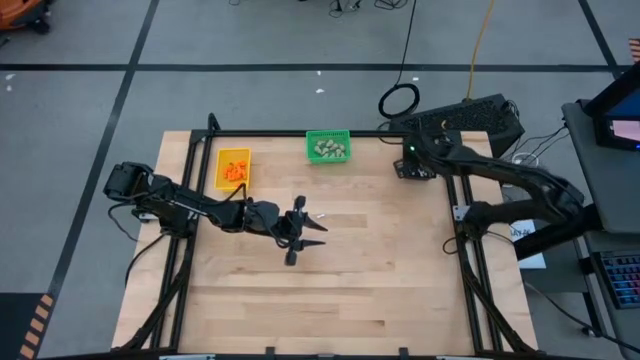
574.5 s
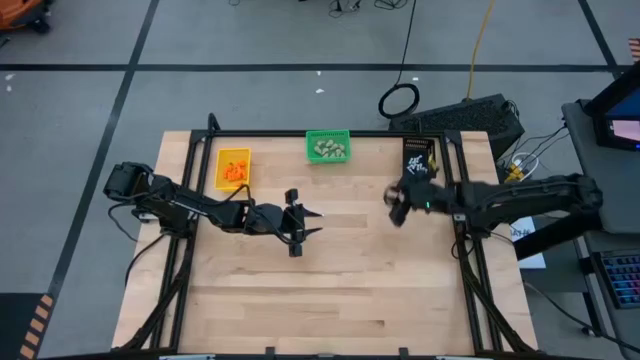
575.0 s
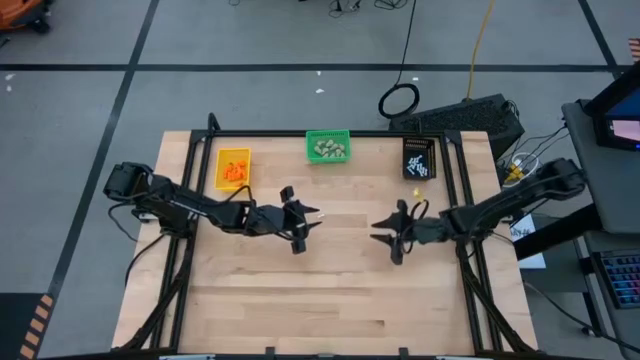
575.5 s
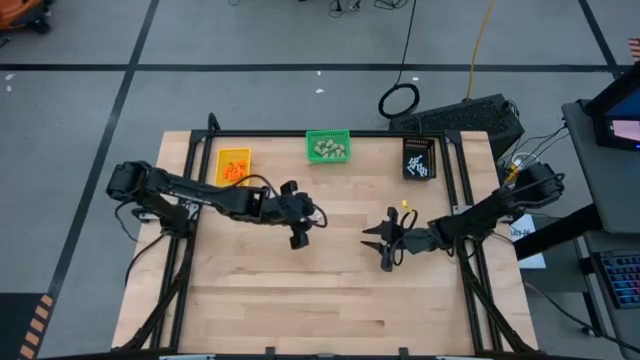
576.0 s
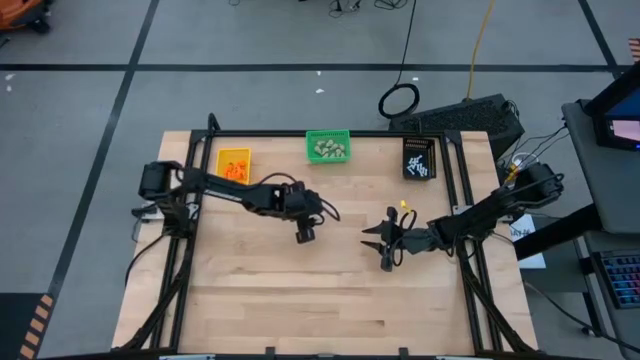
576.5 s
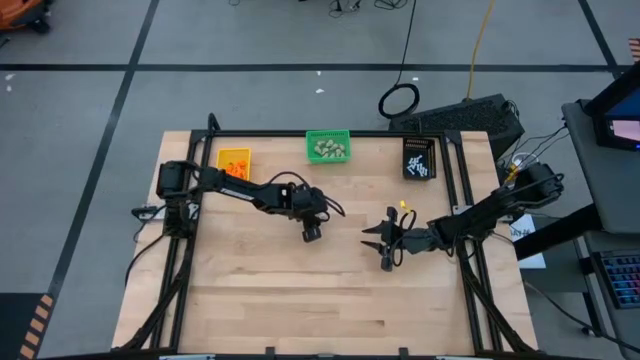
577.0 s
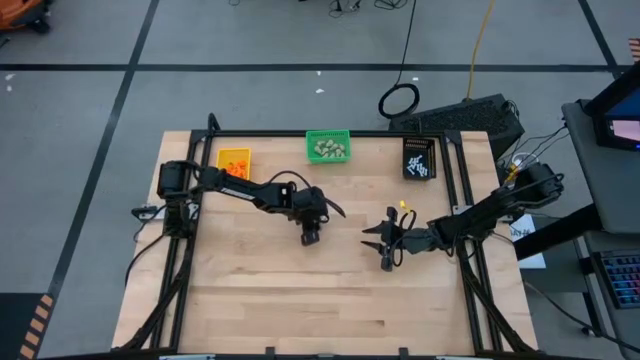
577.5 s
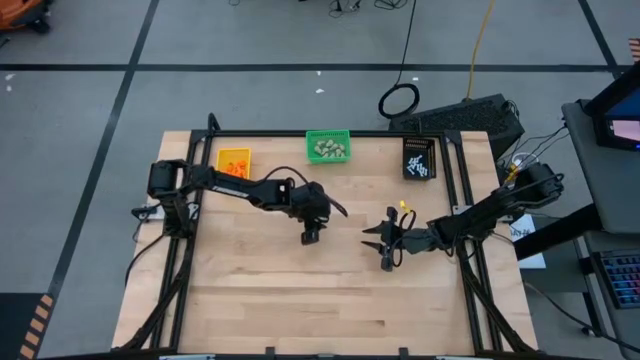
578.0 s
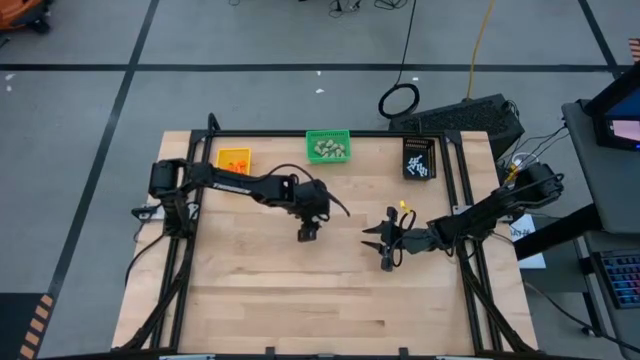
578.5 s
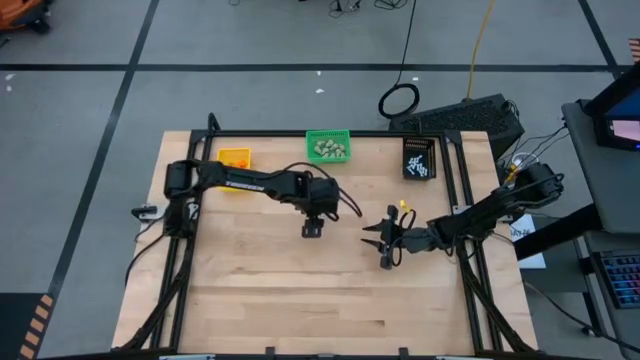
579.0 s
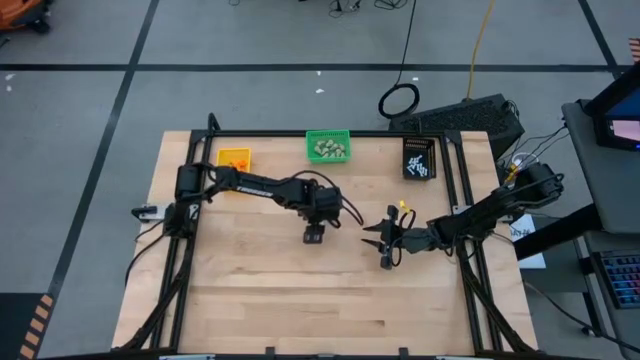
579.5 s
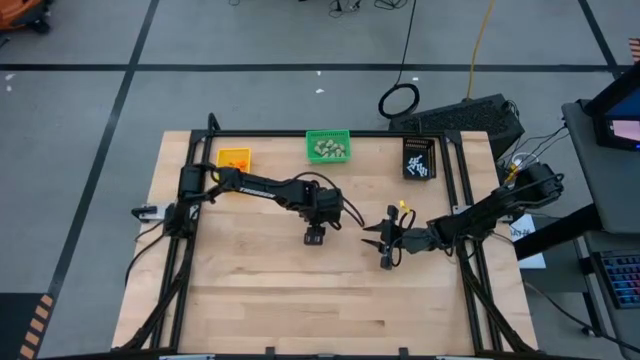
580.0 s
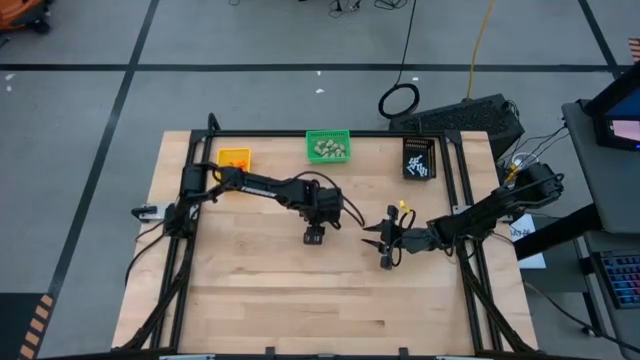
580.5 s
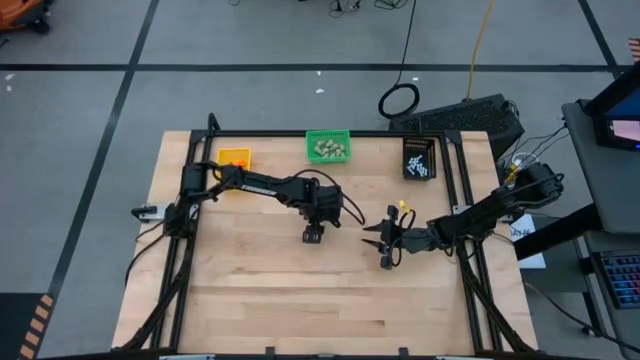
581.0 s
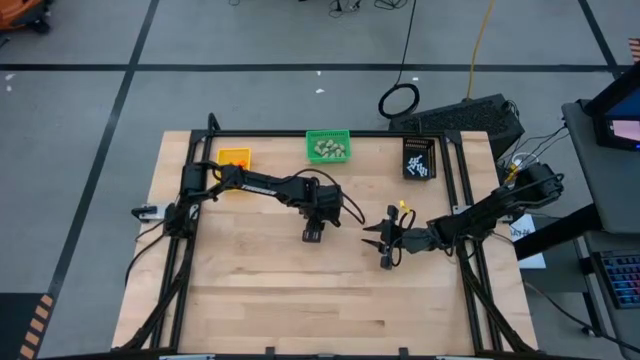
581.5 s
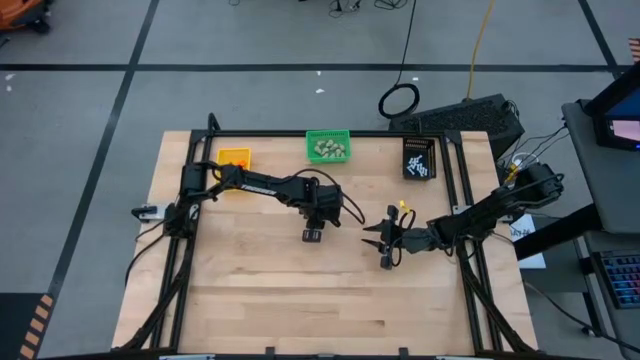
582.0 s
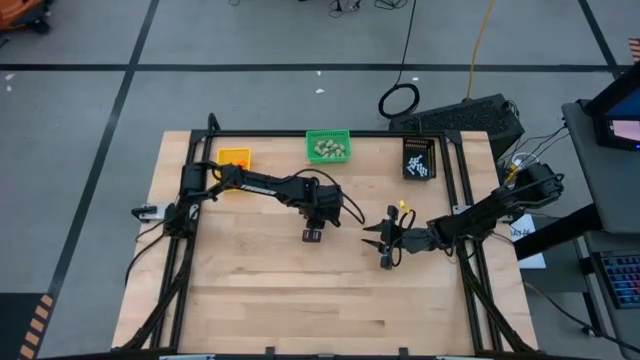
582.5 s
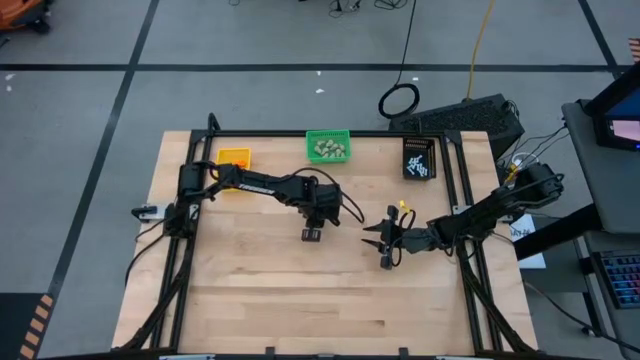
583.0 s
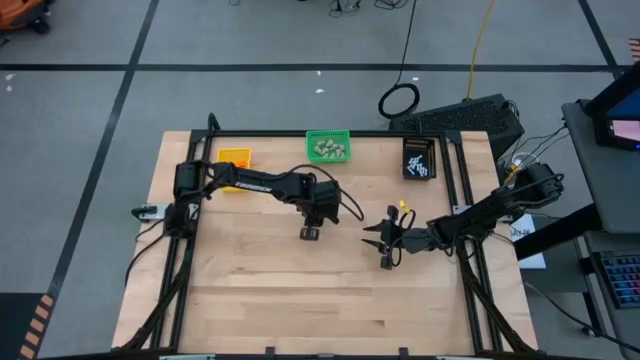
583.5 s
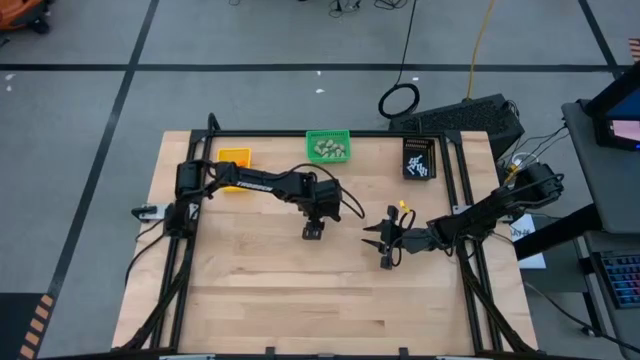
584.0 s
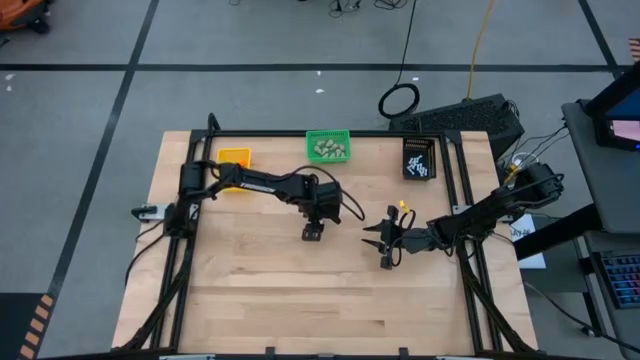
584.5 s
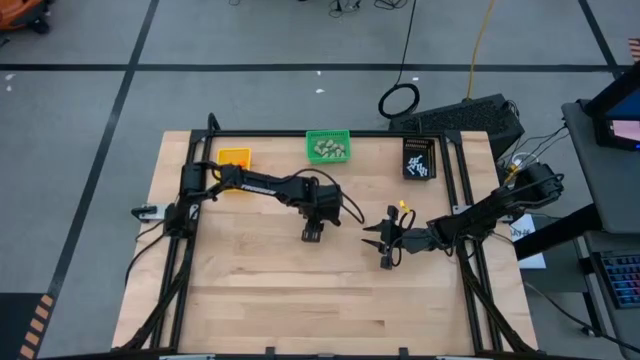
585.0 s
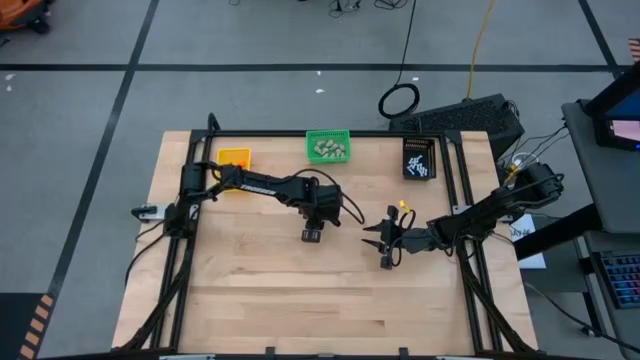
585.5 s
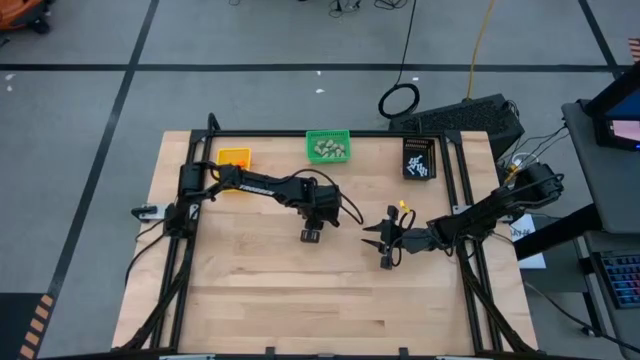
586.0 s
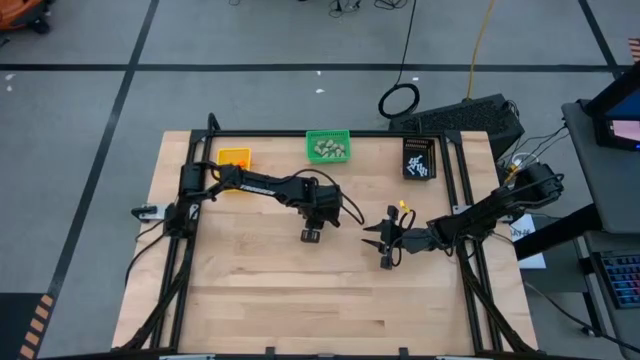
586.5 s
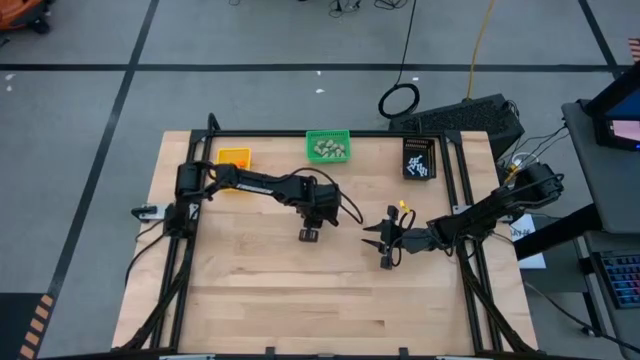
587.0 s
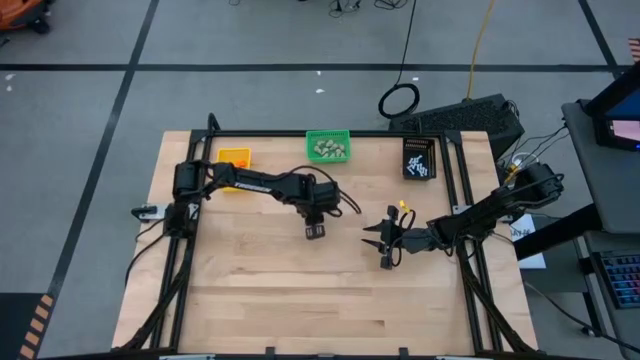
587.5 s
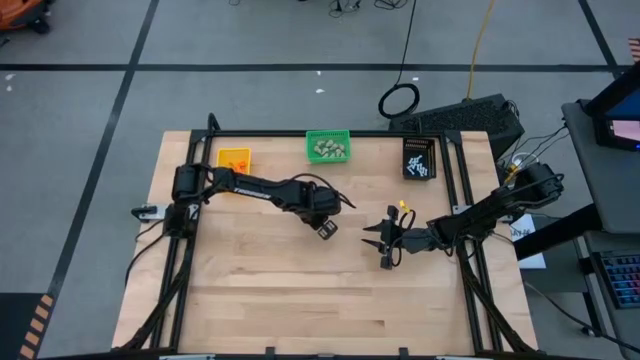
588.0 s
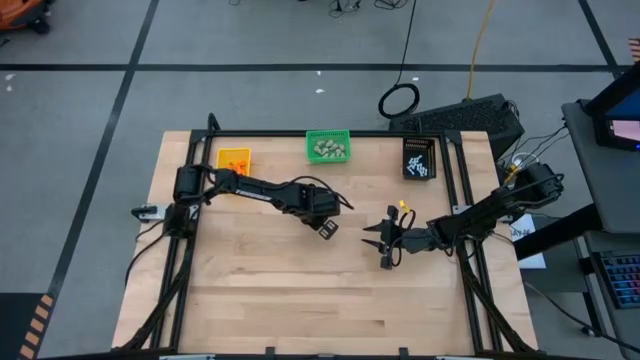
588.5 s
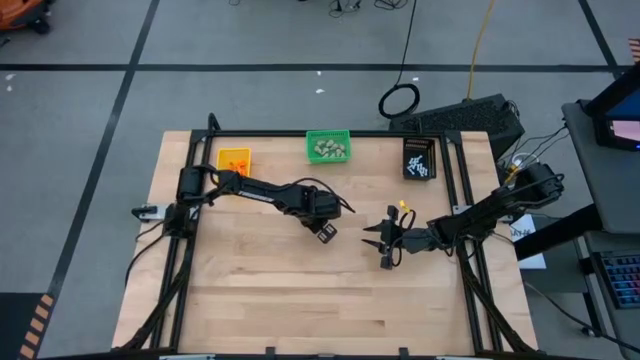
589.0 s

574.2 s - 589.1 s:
Task: Sort Halloween decoration
Put the white bone toy into the black bin

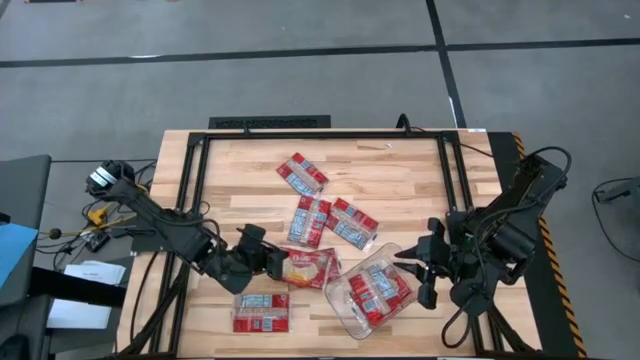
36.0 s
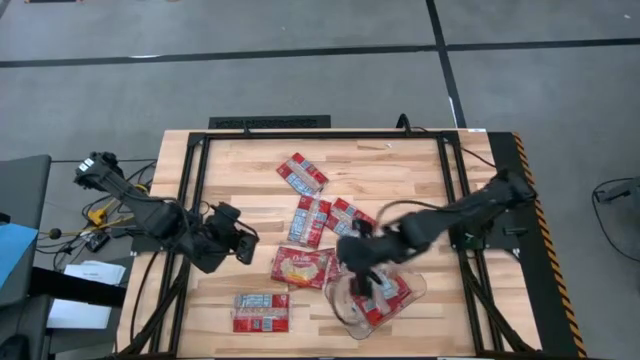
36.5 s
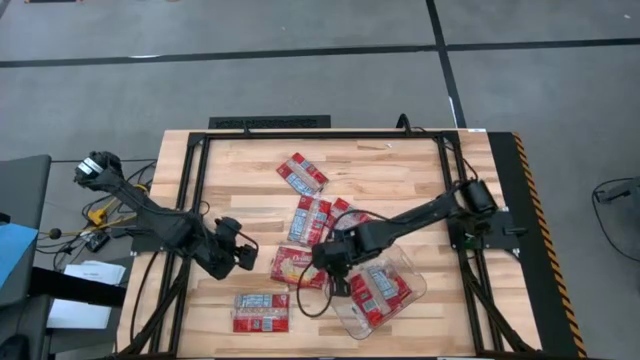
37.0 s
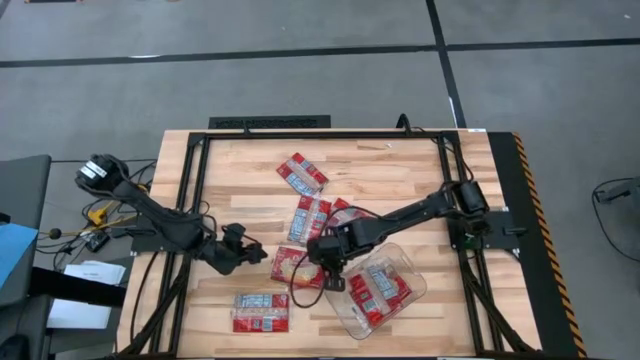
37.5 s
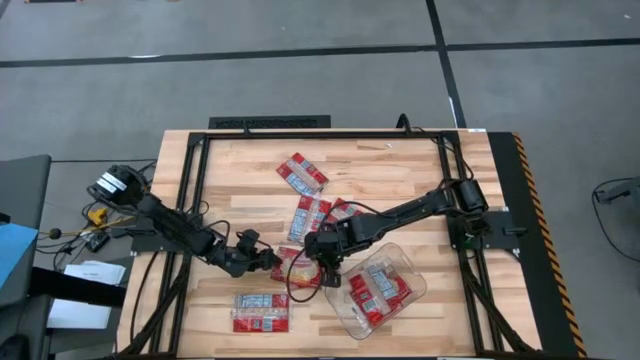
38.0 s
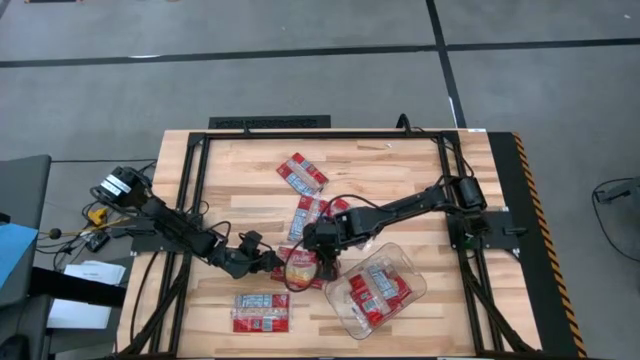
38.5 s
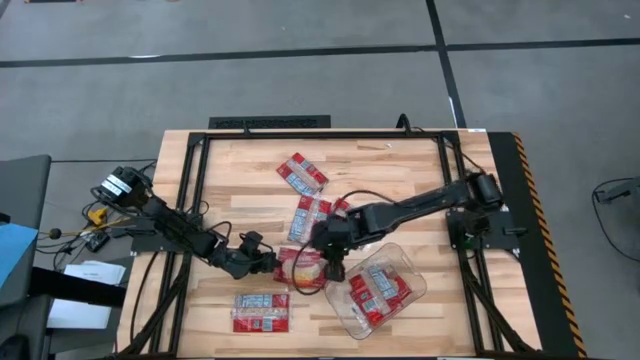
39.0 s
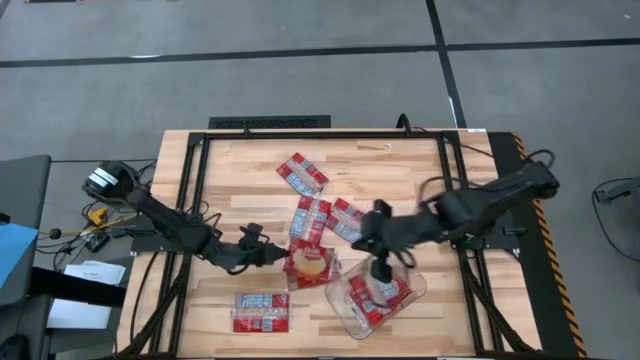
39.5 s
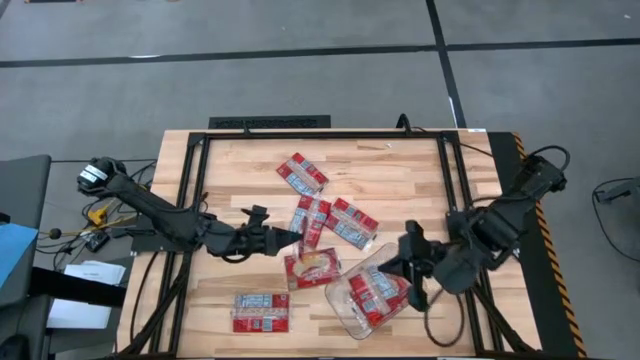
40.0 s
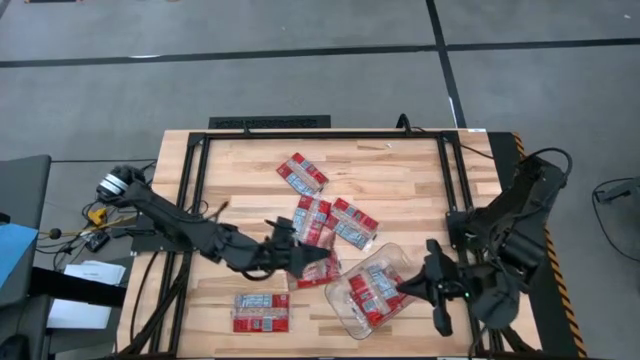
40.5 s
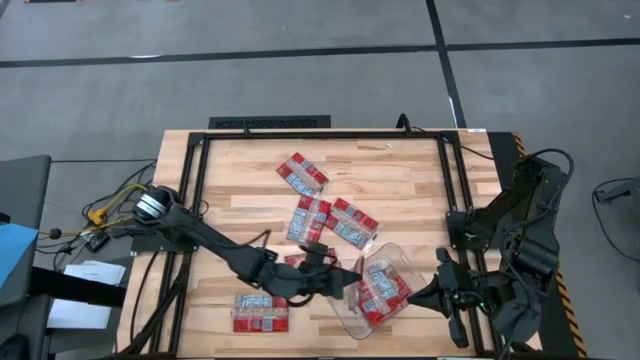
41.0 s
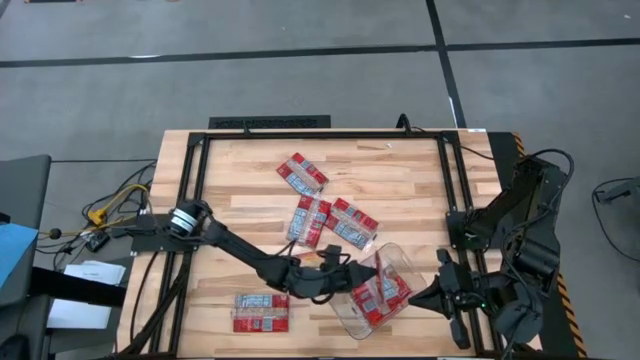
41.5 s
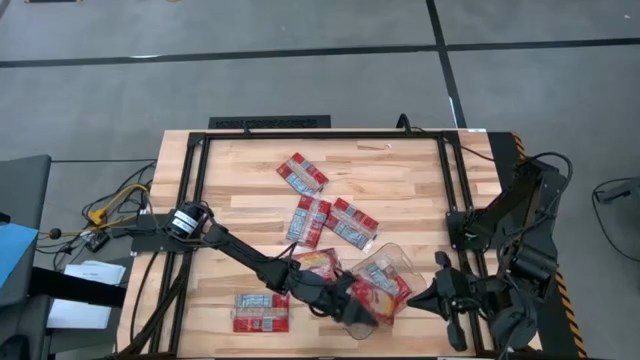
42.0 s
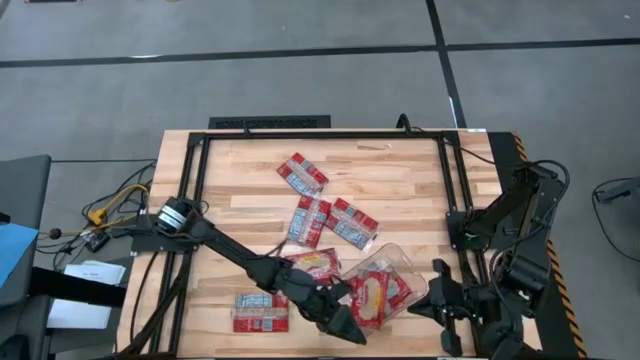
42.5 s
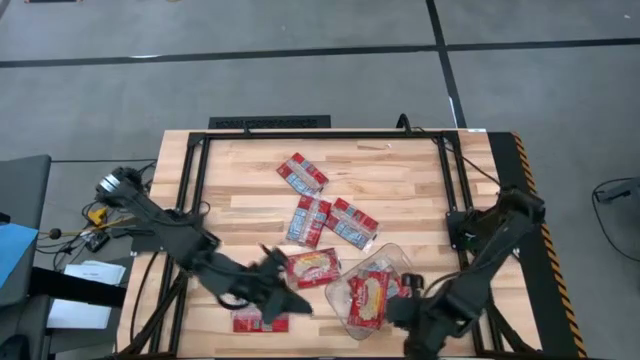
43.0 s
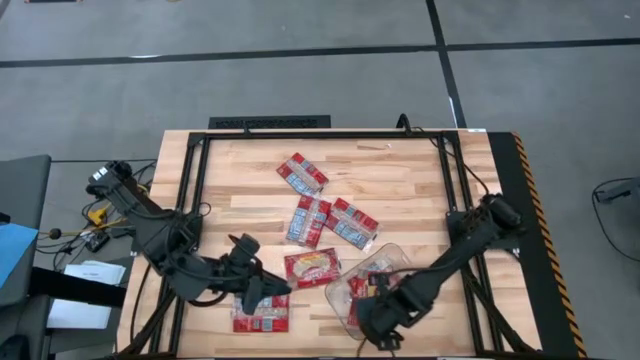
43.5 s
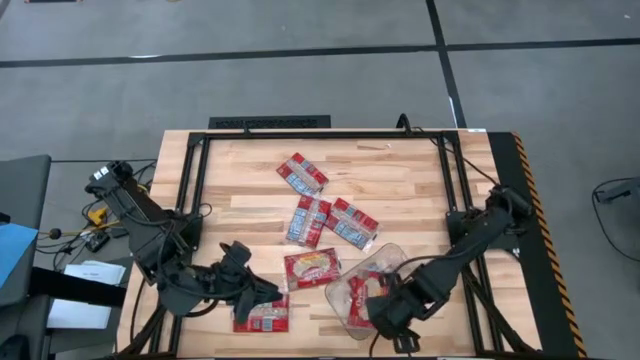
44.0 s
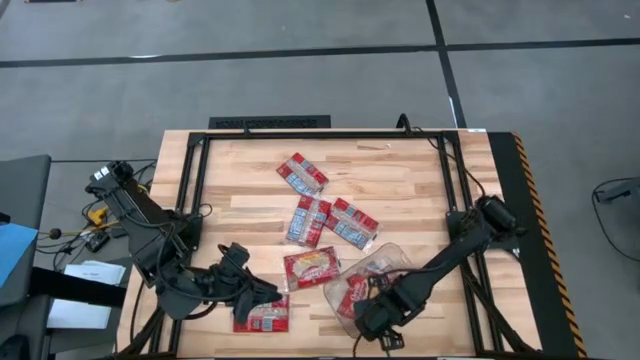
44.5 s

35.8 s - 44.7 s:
Task: Sort popcorn bags into baskets
Put the red popcorn bag into the transparent bin
